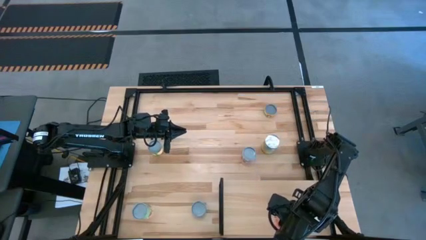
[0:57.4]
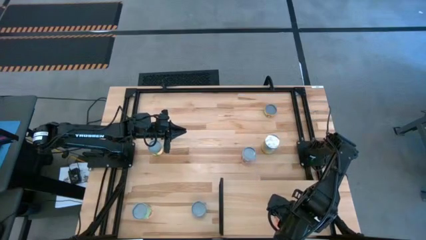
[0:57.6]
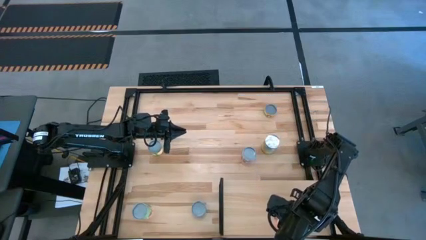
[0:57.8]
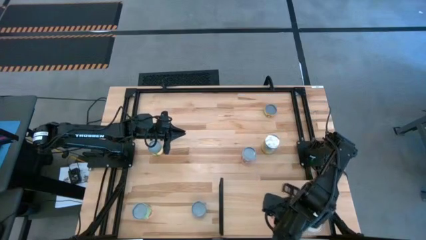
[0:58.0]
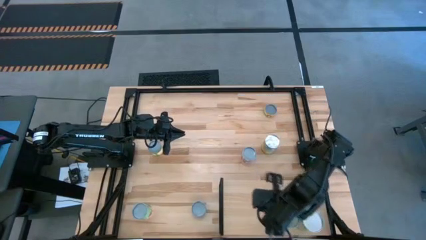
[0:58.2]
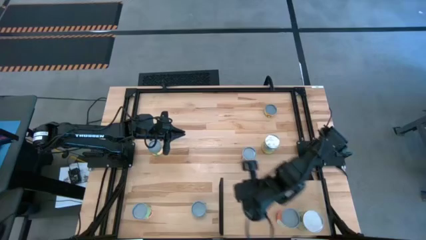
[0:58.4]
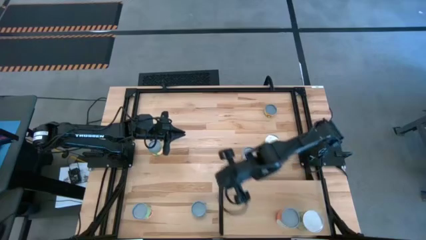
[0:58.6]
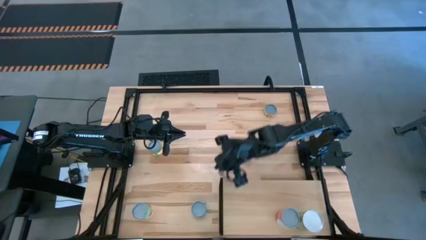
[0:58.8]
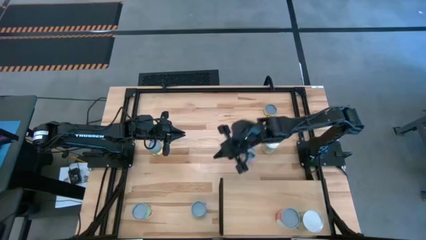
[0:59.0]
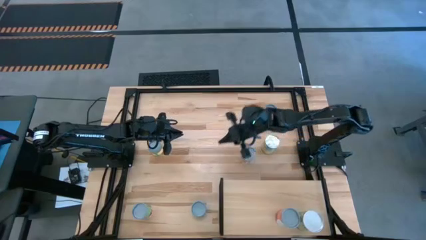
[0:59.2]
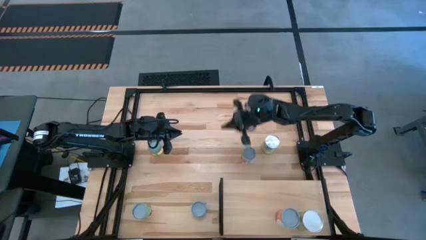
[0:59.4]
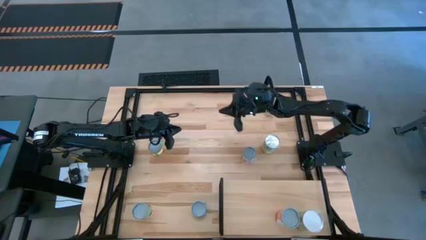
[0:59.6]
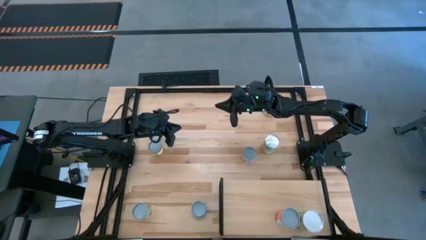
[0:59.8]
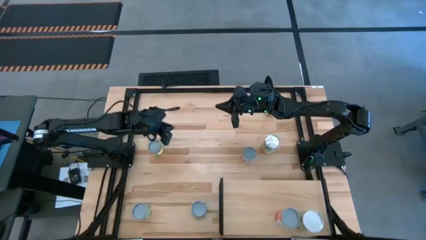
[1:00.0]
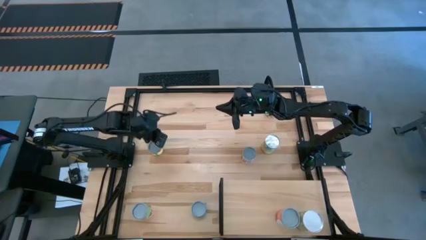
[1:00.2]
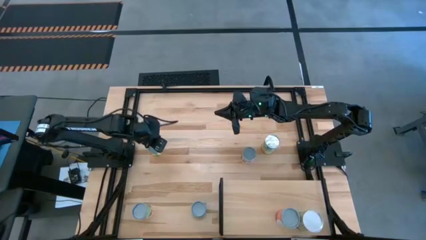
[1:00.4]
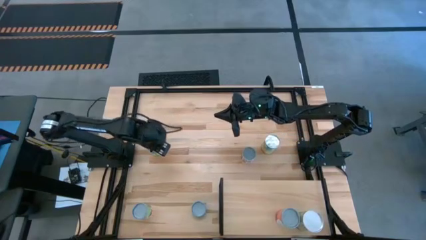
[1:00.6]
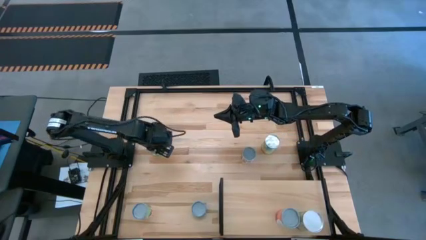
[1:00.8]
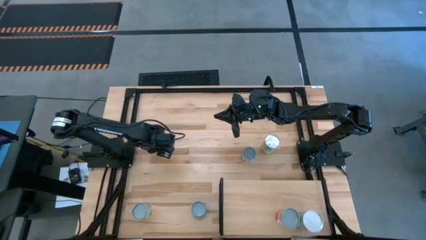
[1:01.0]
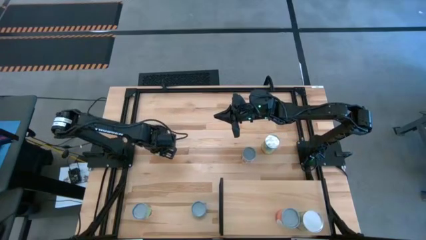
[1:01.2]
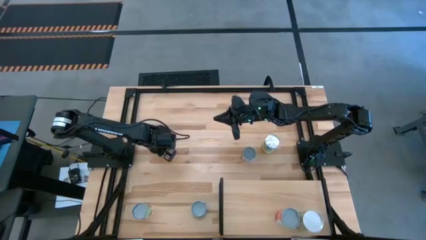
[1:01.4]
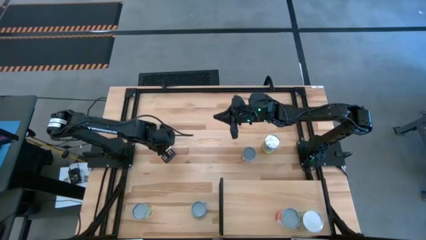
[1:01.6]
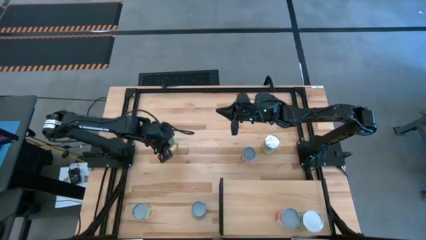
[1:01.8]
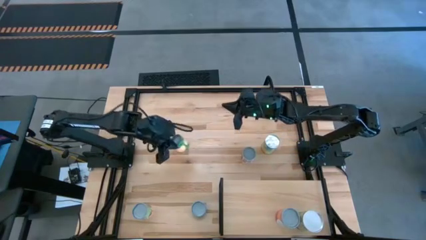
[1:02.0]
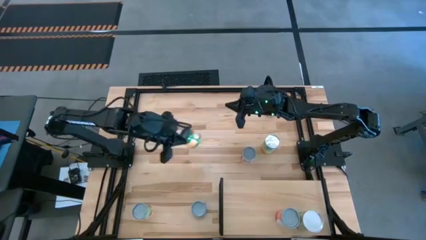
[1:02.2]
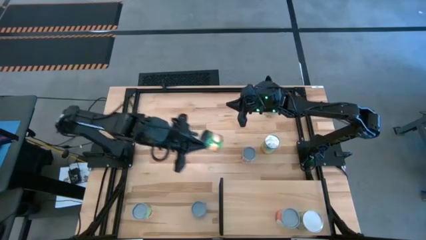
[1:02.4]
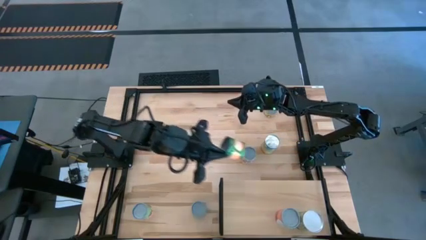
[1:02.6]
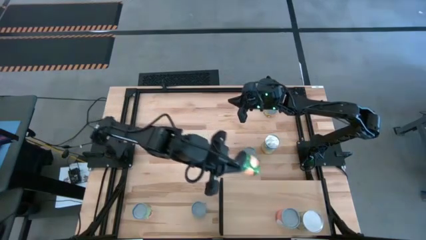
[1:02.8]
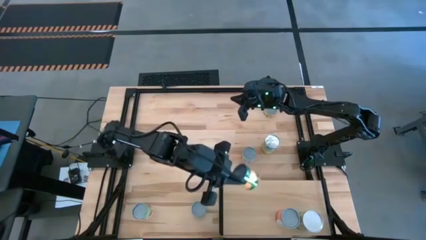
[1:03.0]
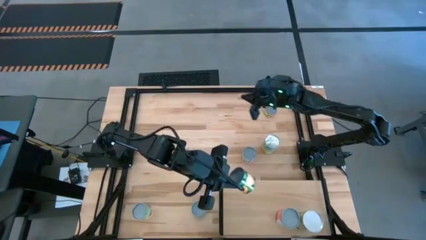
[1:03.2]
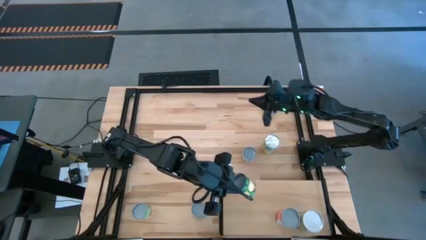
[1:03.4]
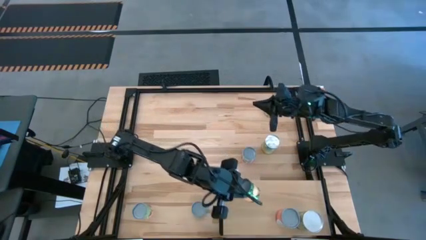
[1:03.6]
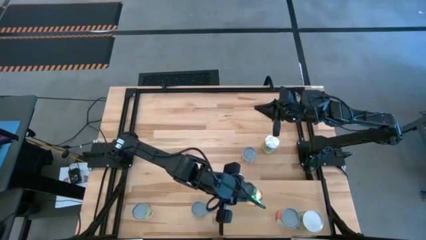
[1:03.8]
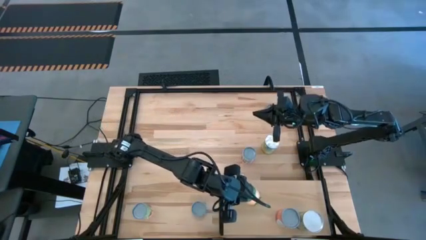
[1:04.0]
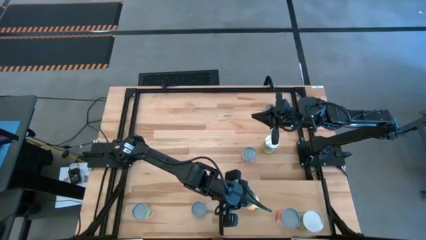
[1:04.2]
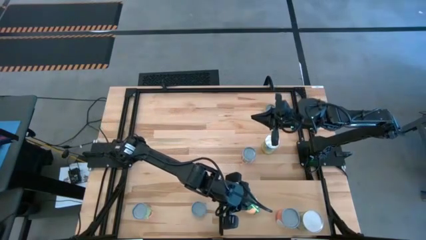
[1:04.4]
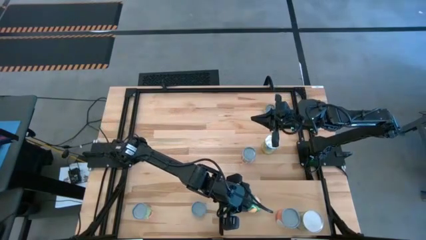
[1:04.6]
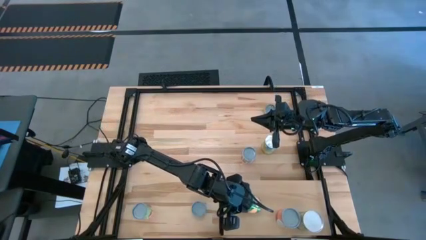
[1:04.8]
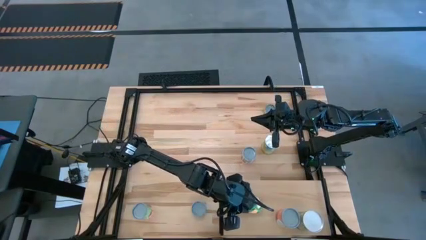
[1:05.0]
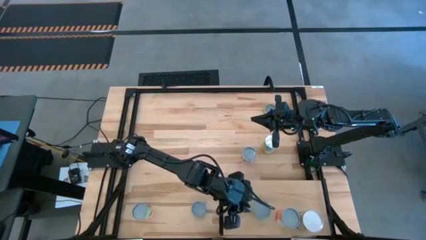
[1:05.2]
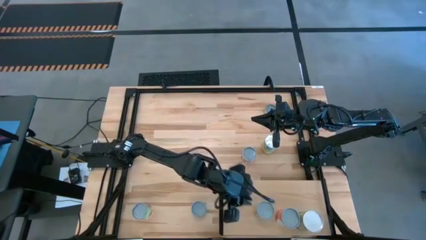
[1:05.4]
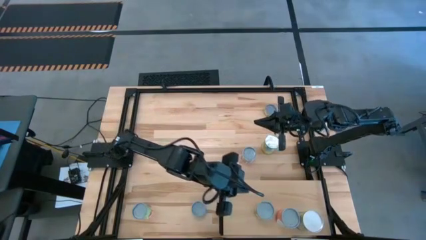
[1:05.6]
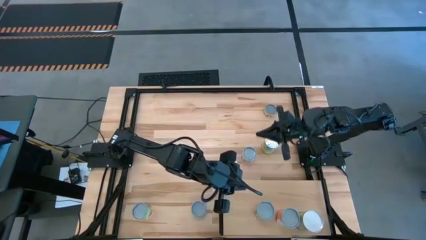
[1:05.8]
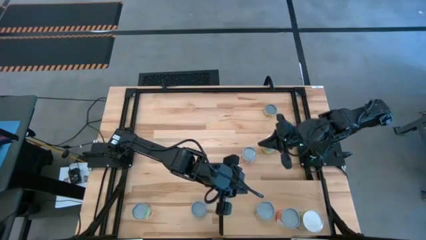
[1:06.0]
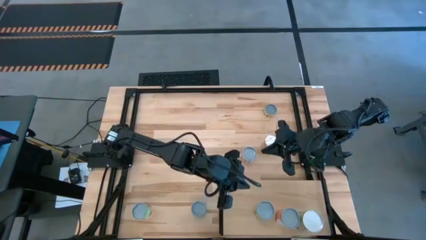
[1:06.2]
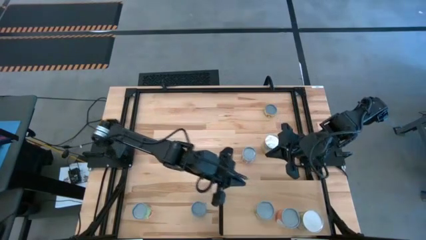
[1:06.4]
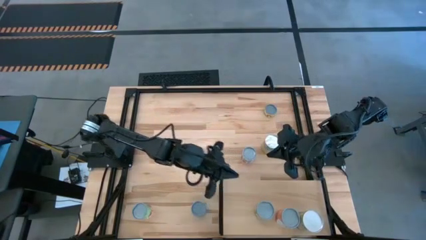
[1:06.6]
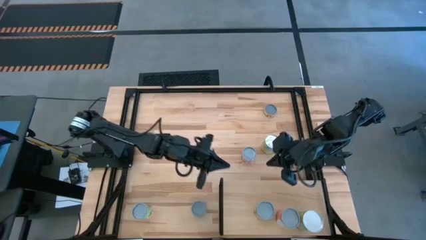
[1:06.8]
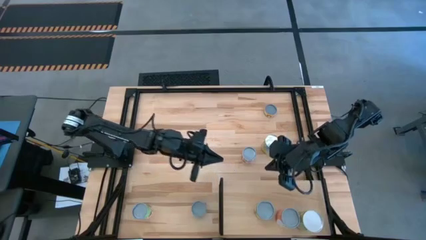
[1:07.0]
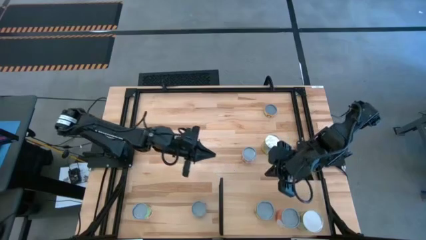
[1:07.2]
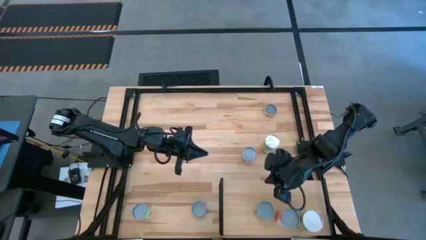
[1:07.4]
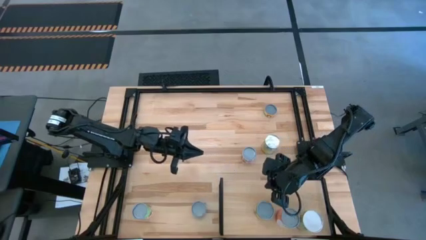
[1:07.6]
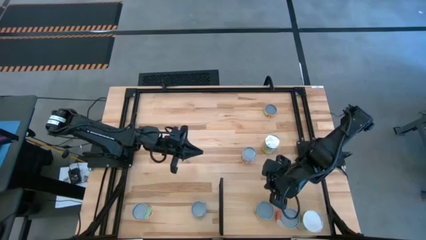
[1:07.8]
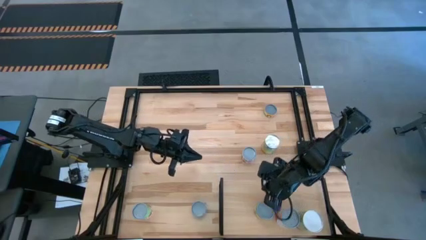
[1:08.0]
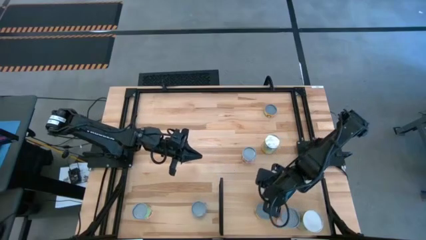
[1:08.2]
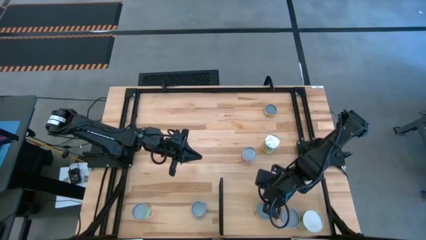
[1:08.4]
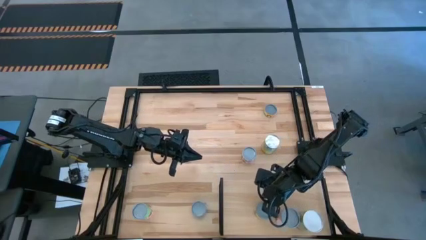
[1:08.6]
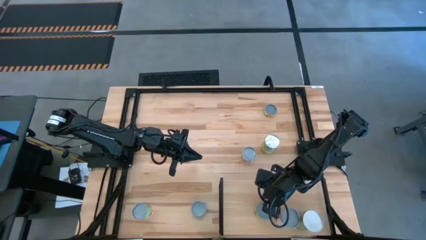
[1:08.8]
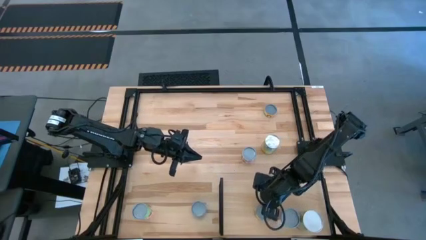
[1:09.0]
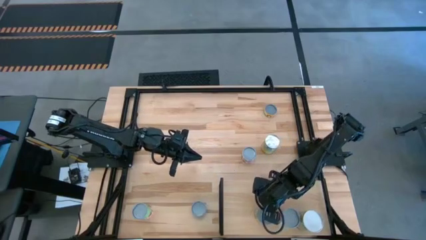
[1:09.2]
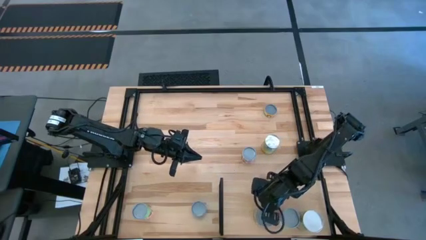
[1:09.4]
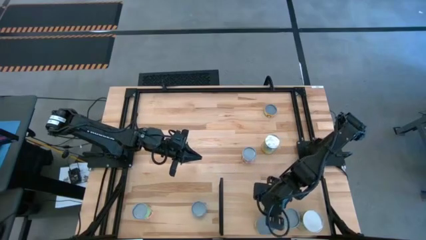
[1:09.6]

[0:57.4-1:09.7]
Task: Pick and place cans onto a shelf
Put the canned peaches onto the shelf

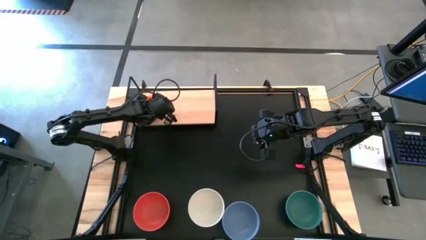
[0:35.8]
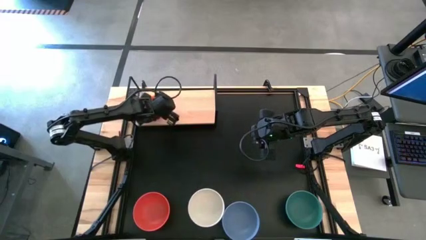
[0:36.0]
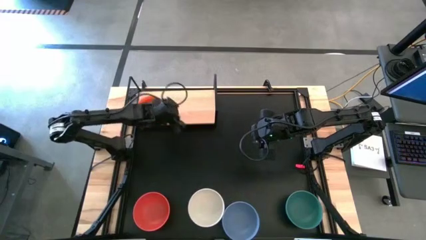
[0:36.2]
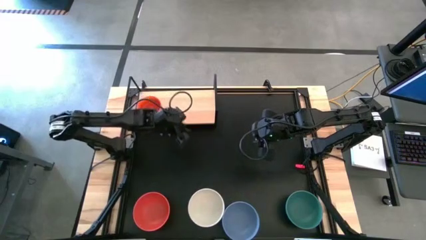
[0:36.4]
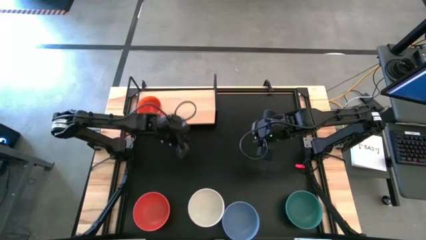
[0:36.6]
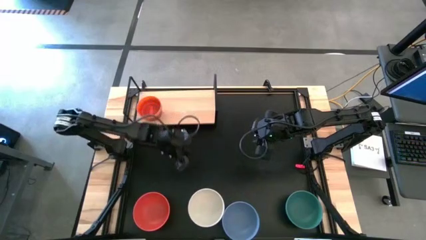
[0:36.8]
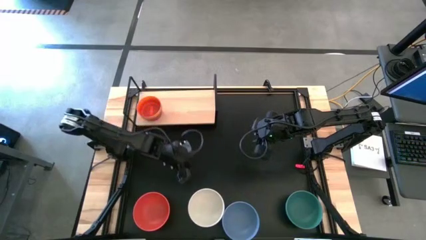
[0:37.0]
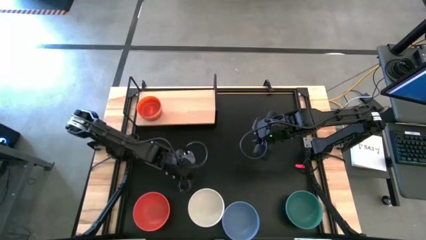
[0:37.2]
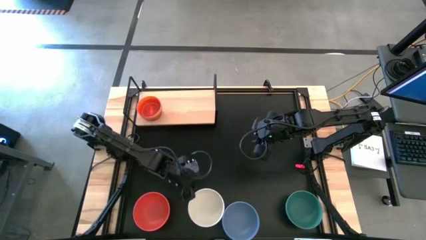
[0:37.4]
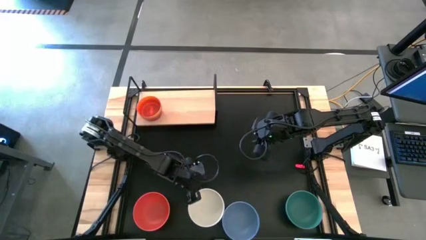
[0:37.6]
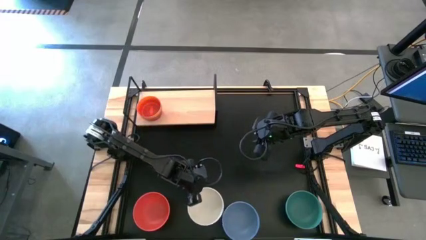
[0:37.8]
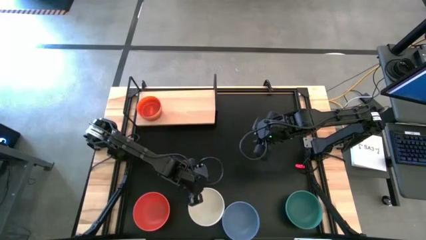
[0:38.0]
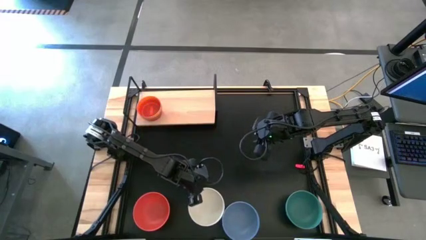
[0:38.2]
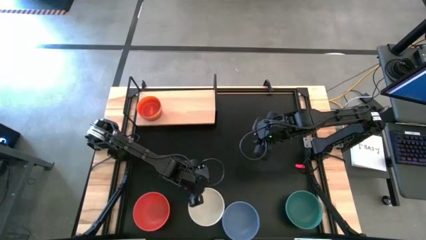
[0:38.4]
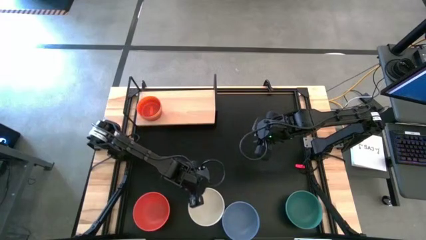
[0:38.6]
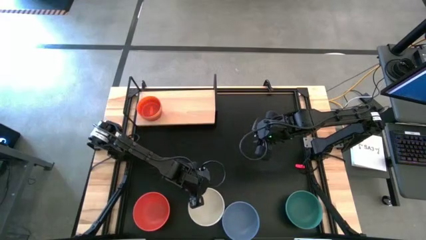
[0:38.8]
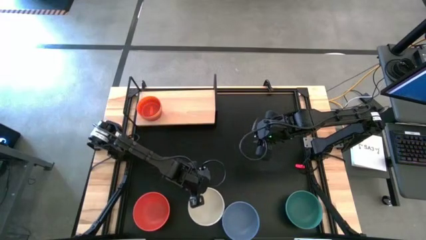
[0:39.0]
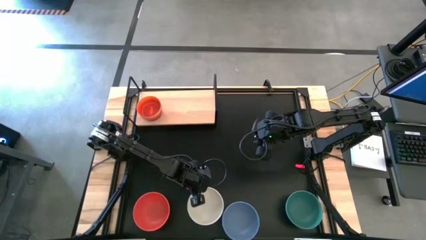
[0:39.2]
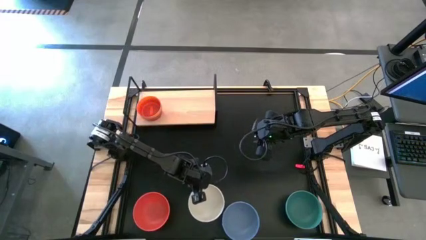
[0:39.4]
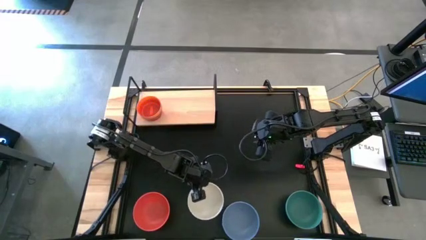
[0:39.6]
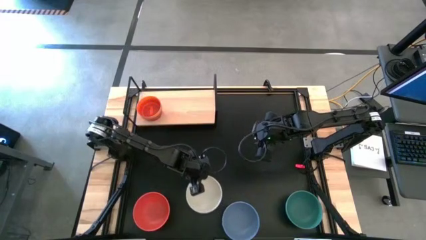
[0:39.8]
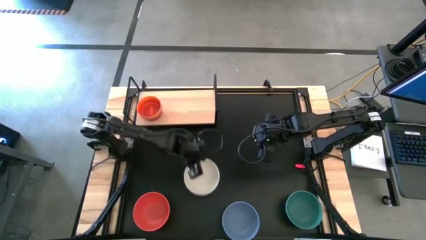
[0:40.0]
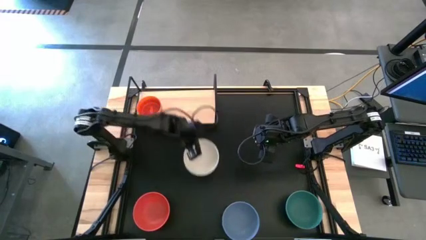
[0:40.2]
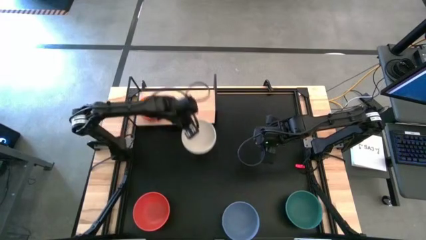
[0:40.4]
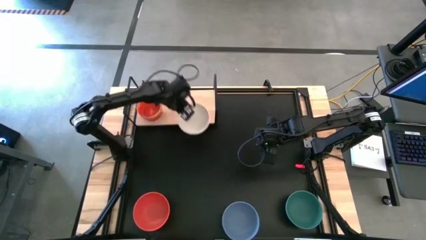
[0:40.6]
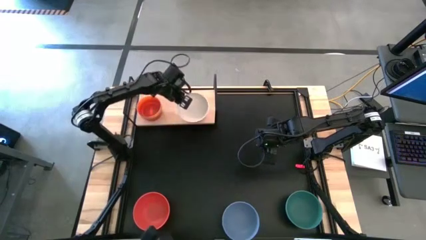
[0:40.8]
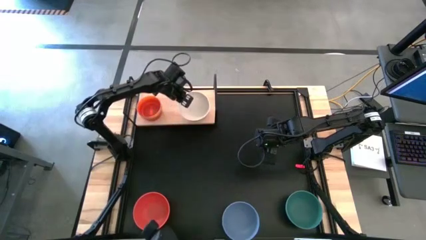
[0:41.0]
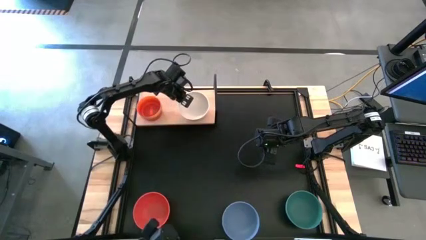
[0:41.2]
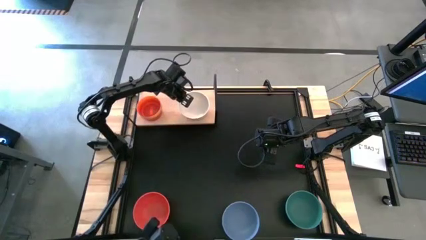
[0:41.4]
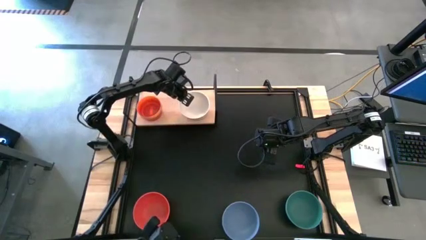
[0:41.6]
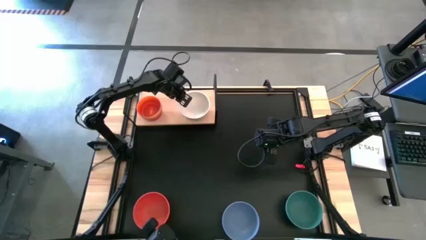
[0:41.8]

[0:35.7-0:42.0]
Task: Place and stack bowls onto a shelf
Put the white bowl on the shelf
